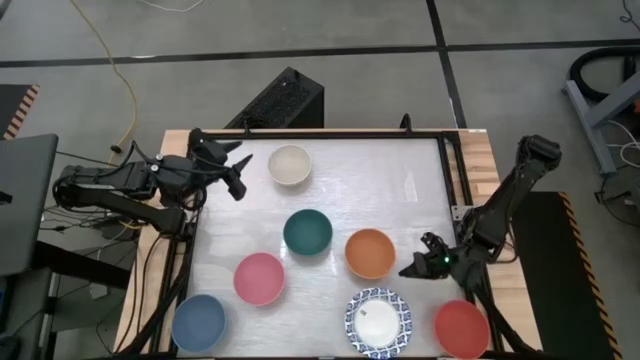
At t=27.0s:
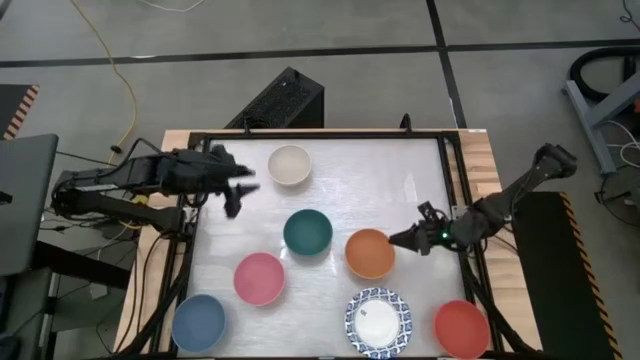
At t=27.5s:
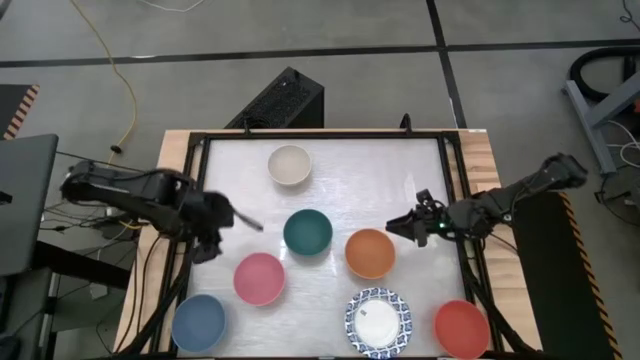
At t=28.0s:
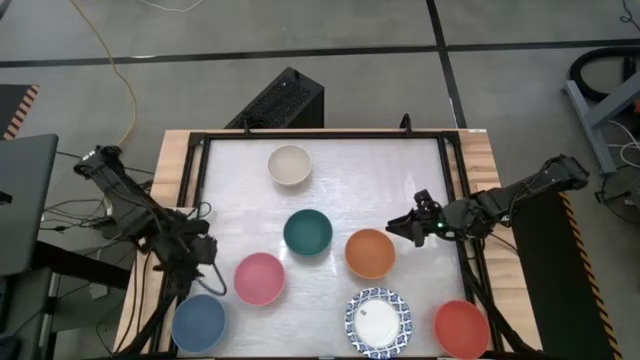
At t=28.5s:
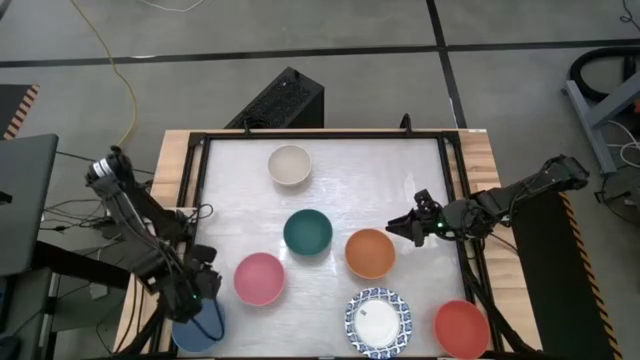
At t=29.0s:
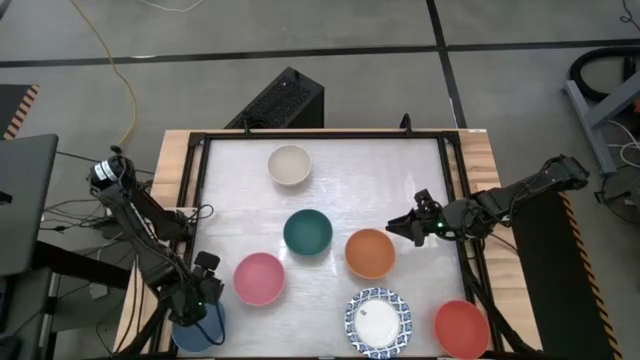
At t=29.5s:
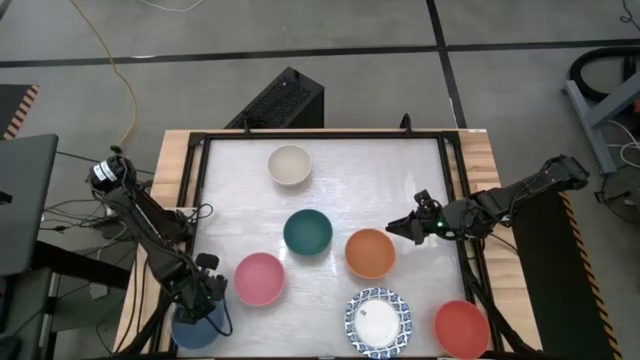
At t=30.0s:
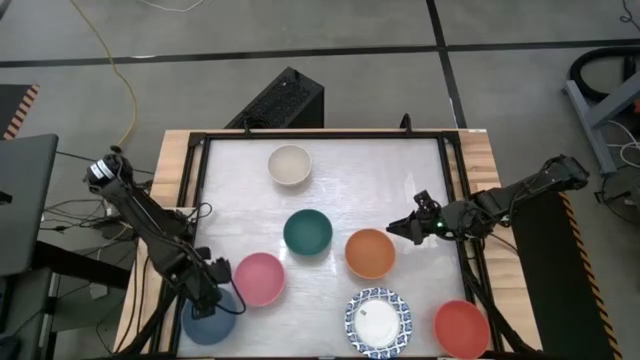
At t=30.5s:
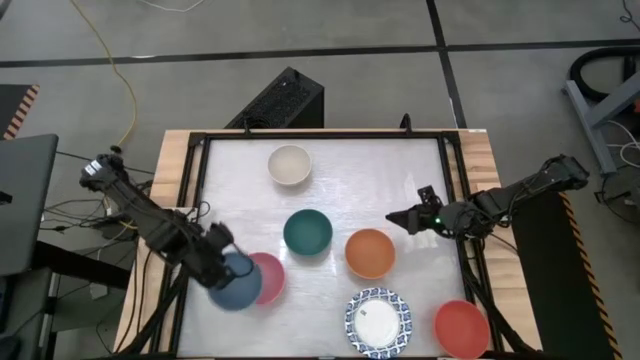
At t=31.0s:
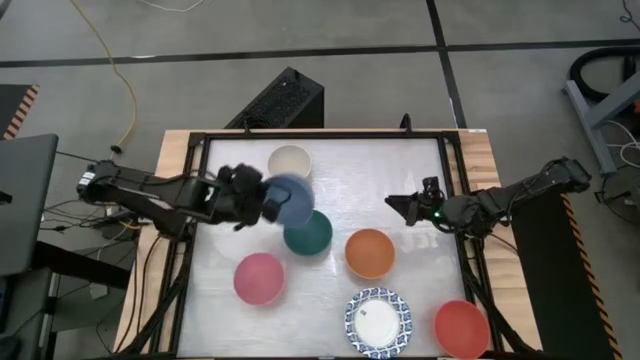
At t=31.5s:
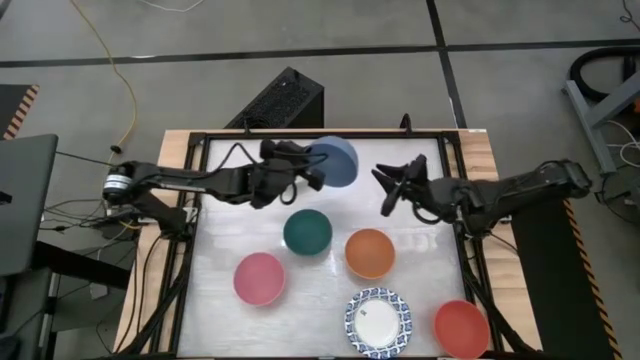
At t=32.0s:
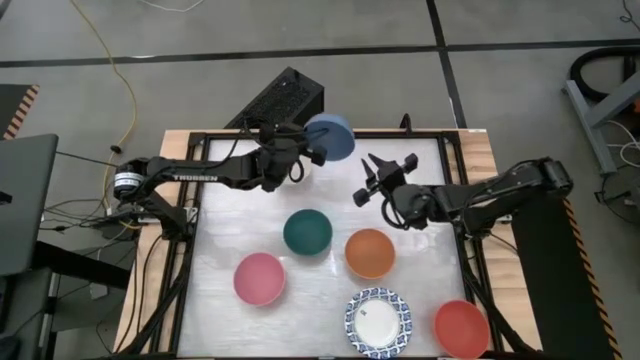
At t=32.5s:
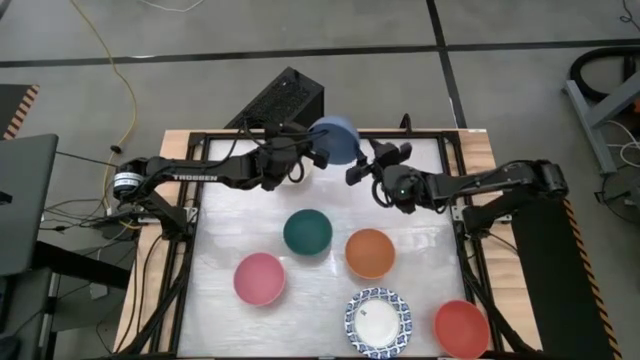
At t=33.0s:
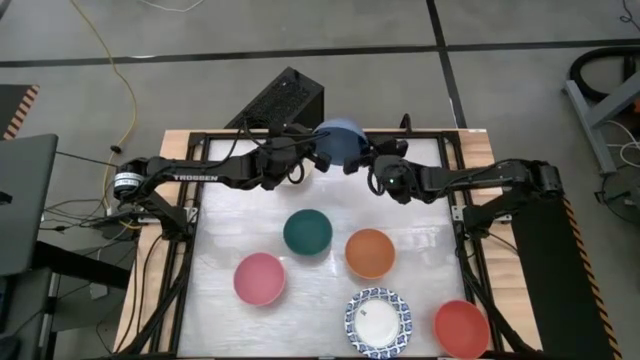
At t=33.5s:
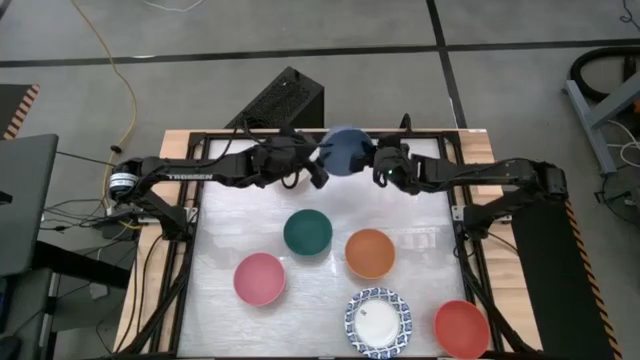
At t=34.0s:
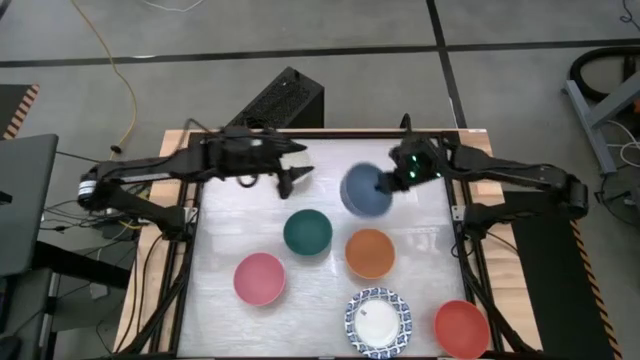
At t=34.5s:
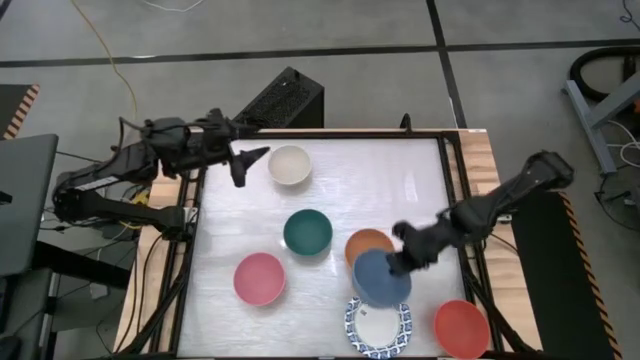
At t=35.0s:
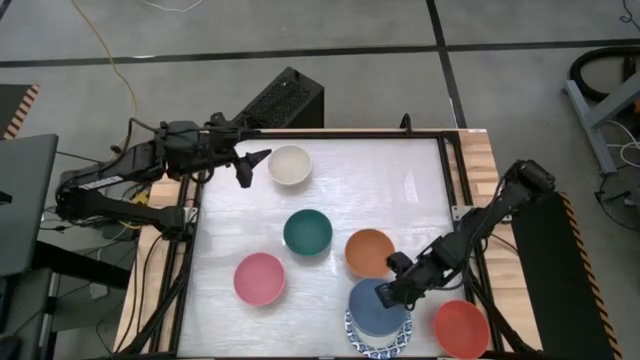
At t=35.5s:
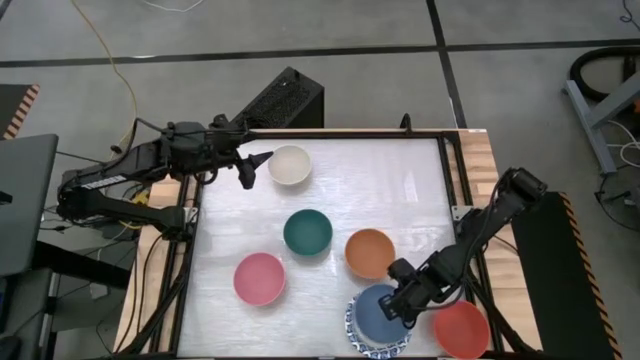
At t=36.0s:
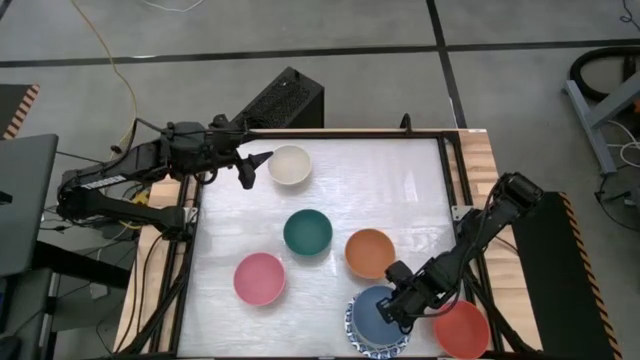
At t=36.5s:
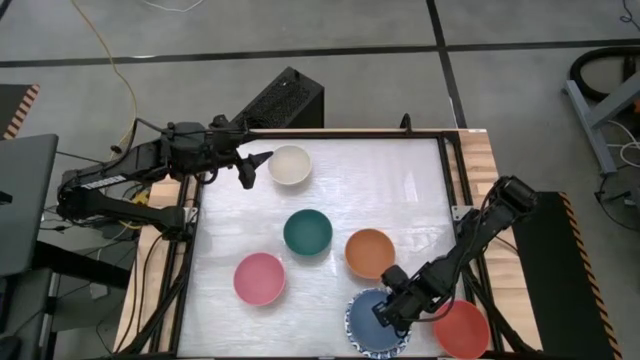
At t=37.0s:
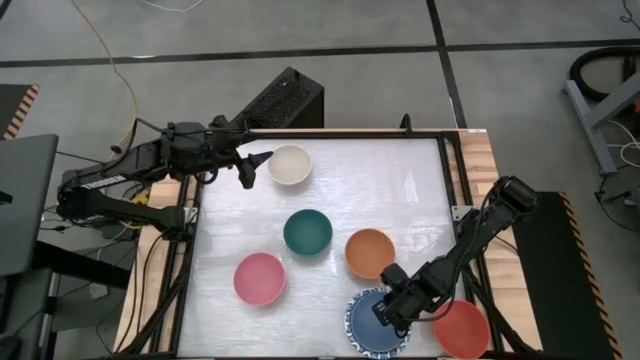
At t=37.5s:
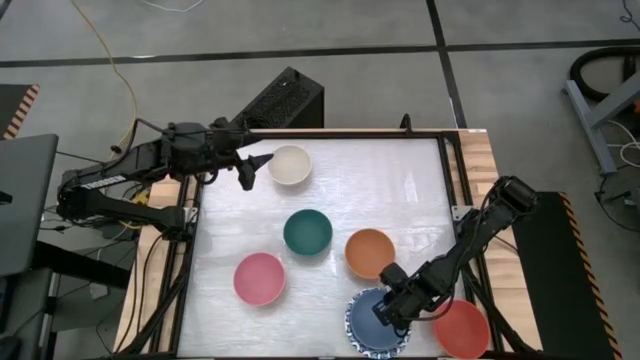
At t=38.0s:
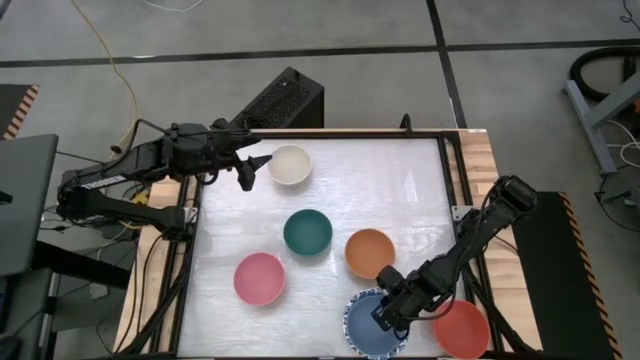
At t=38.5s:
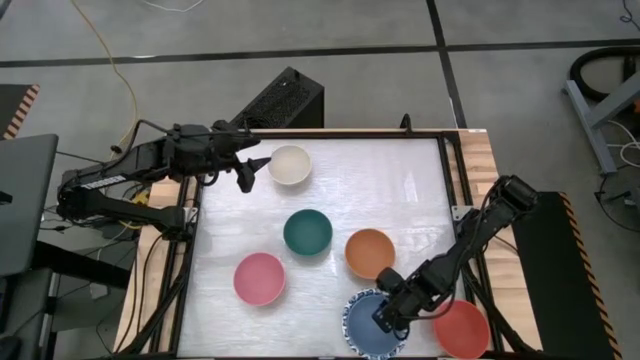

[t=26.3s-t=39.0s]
Stack the blue bowl onto the white and blue bowl

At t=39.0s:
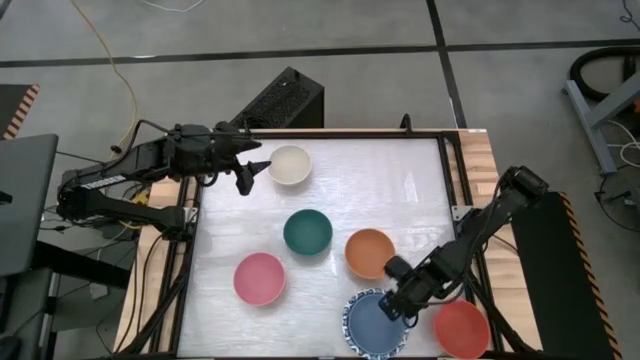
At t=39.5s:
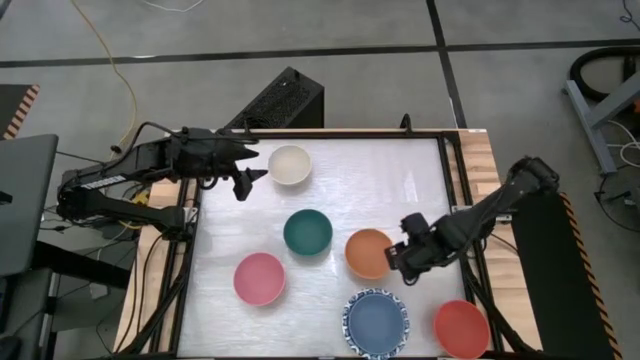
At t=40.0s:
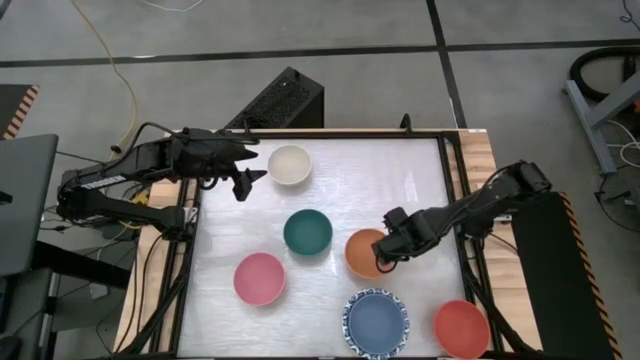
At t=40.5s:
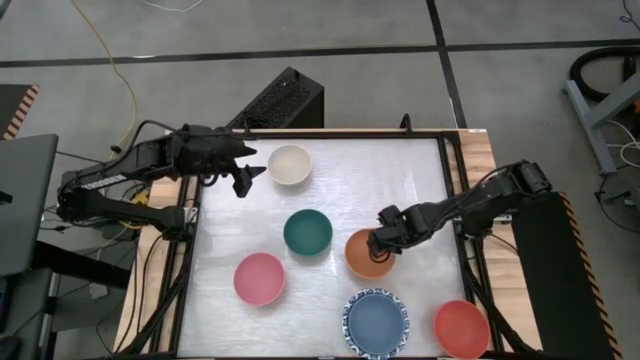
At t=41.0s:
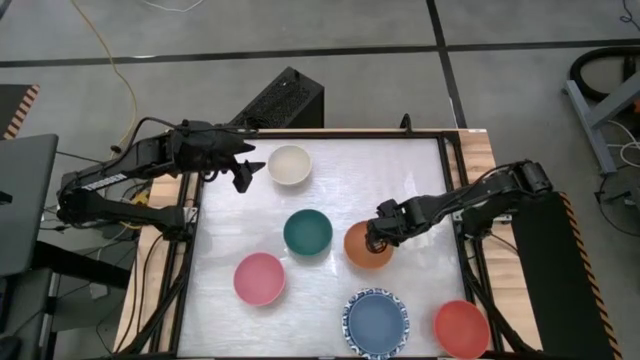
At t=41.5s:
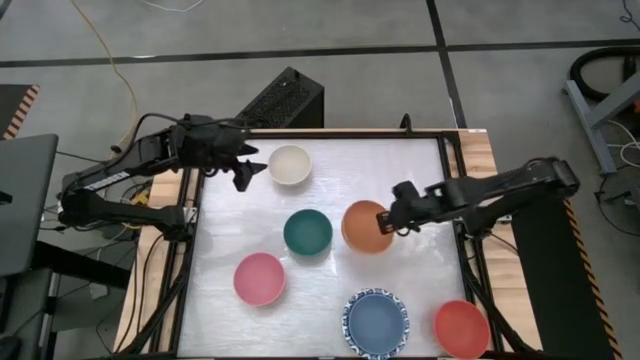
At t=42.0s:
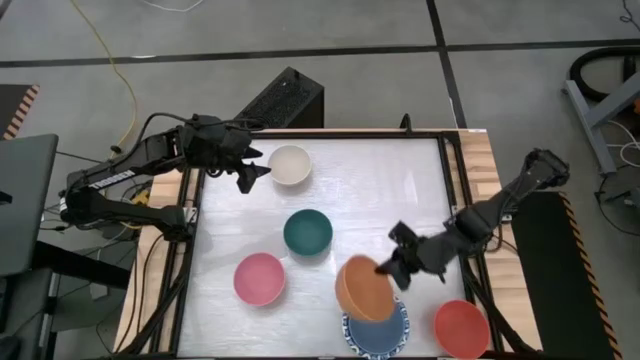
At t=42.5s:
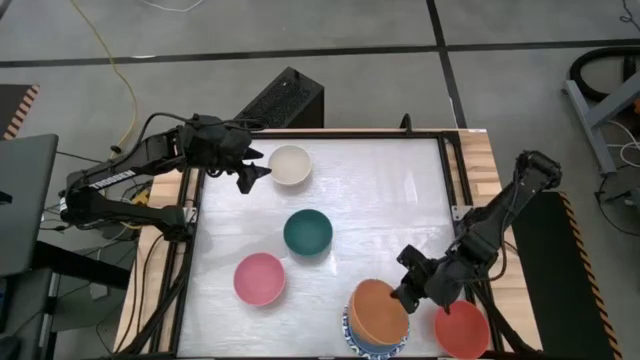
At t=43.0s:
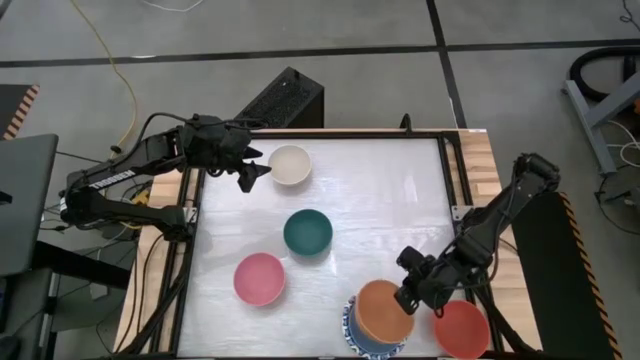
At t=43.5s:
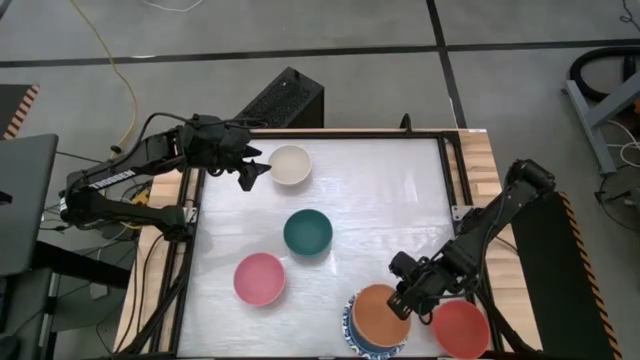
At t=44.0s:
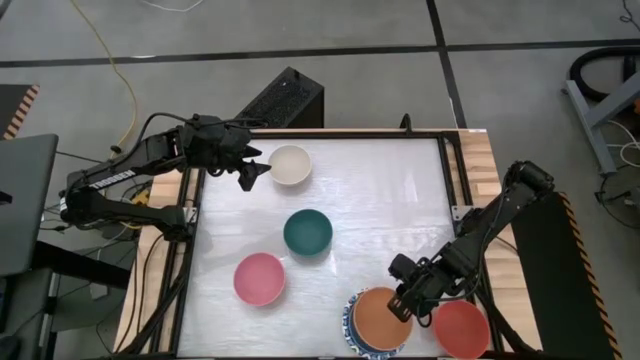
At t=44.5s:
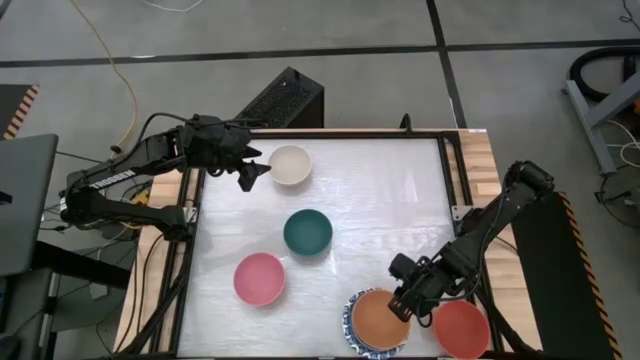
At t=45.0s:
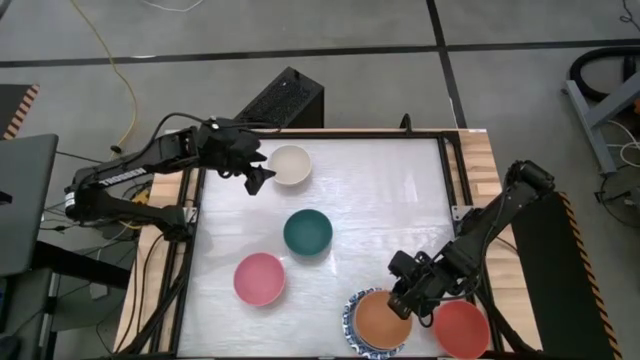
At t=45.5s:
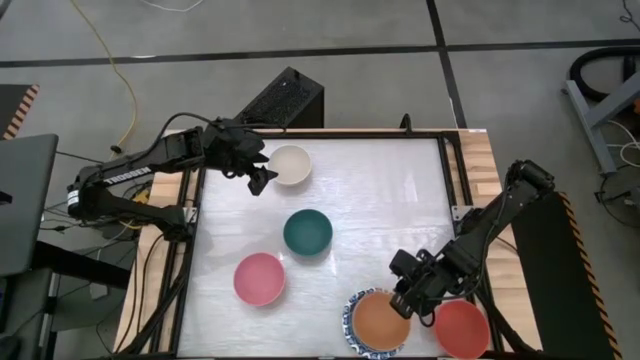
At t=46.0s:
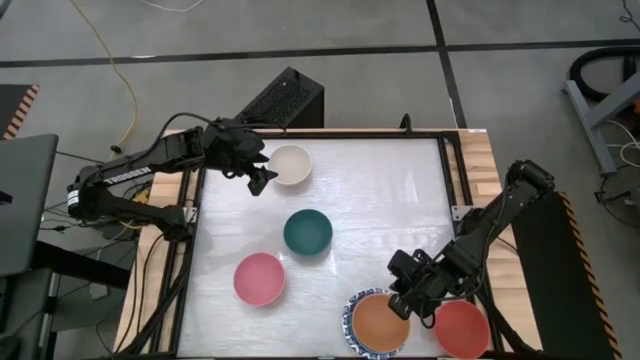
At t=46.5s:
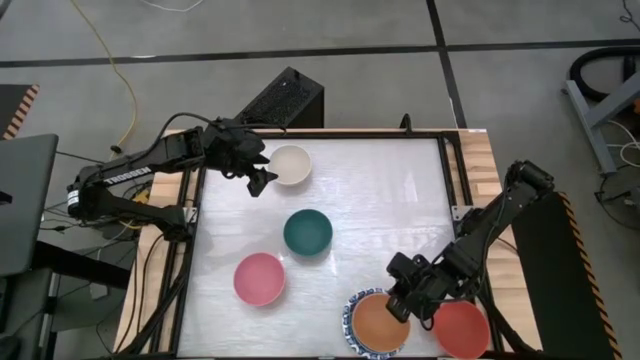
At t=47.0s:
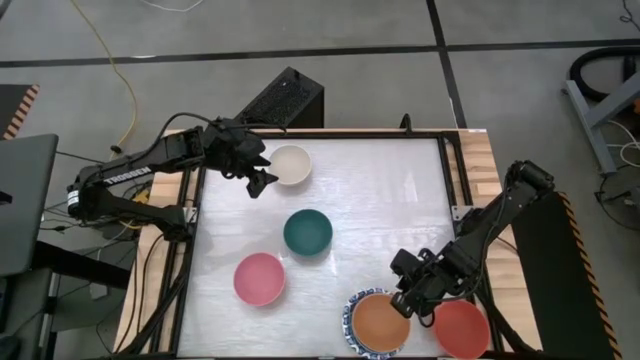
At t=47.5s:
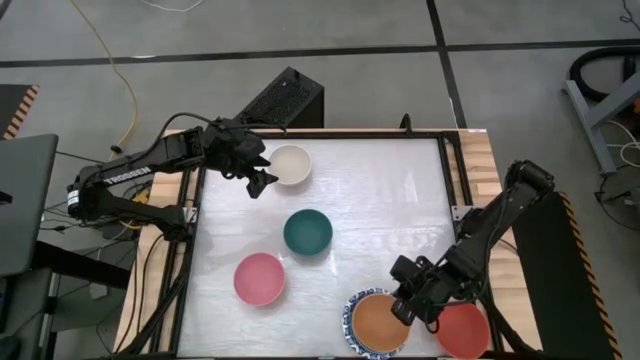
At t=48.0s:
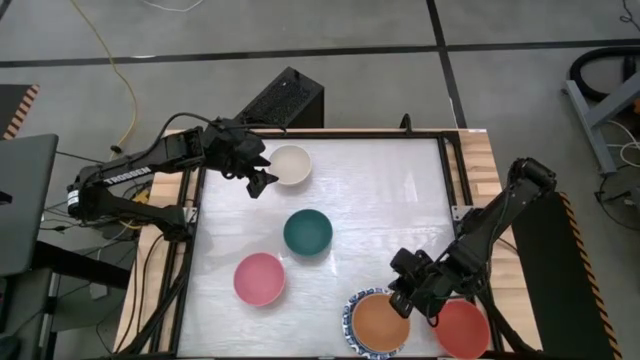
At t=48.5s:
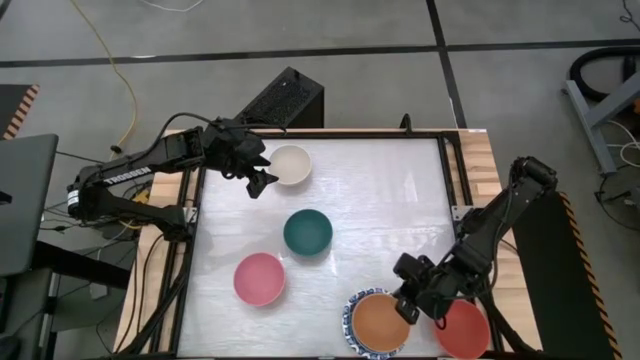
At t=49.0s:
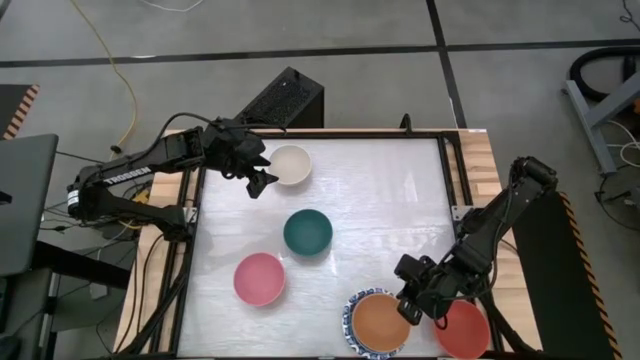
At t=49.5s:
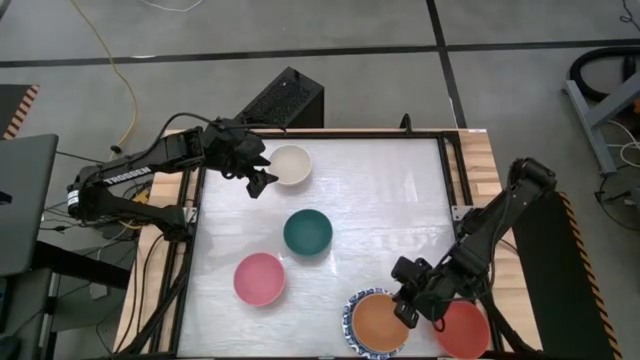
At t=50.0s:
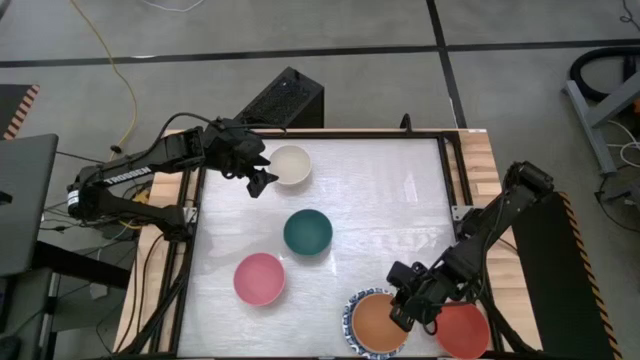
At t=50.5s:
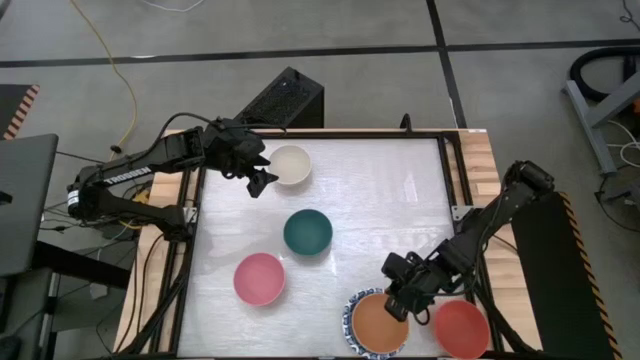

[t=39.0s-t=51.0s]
Stack the light orange bowl onto the blue bowl
